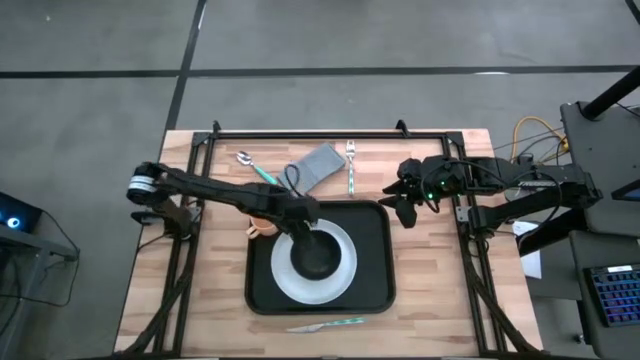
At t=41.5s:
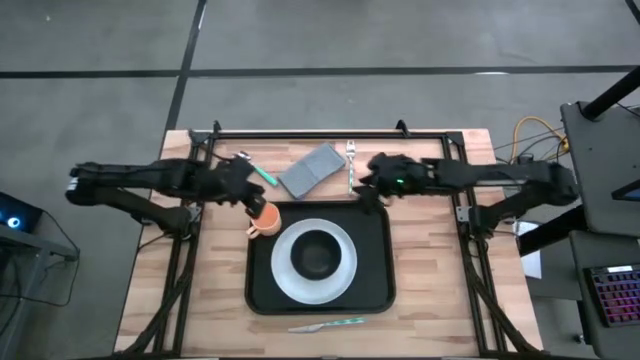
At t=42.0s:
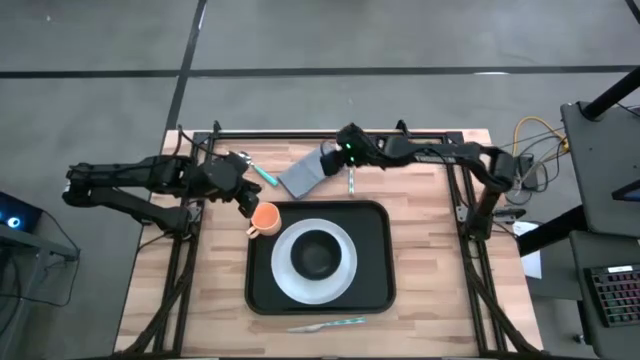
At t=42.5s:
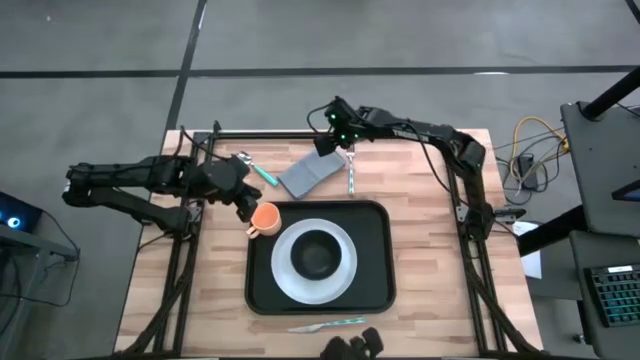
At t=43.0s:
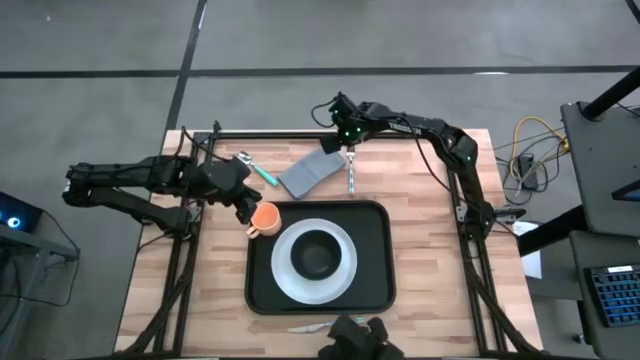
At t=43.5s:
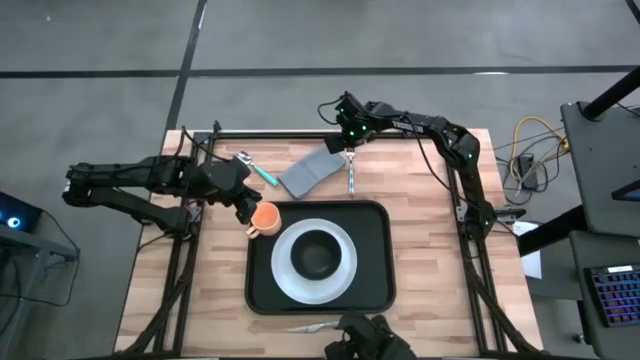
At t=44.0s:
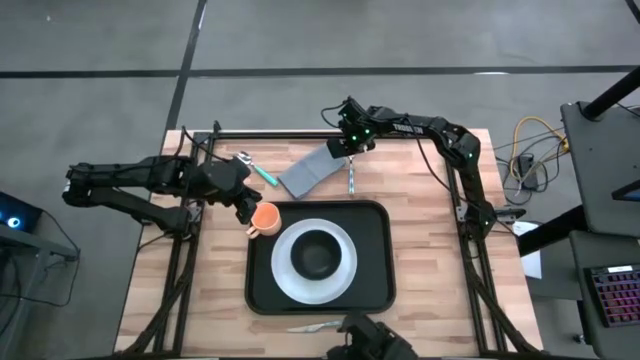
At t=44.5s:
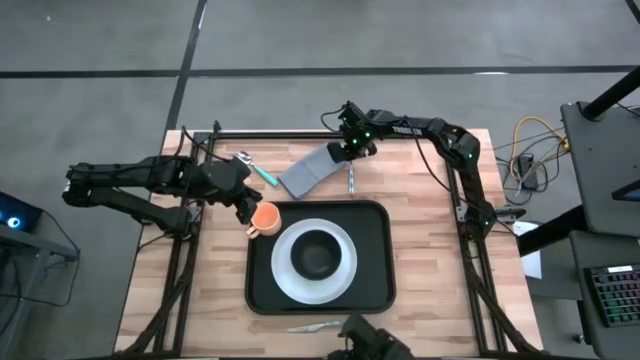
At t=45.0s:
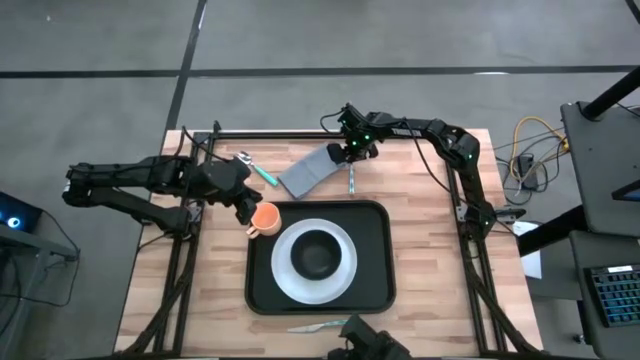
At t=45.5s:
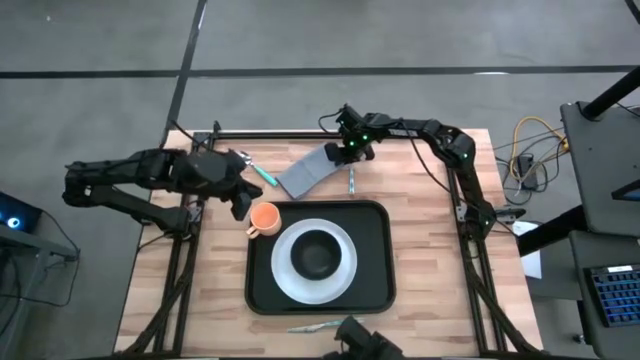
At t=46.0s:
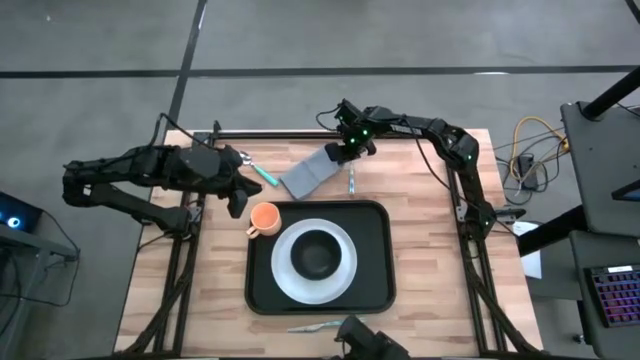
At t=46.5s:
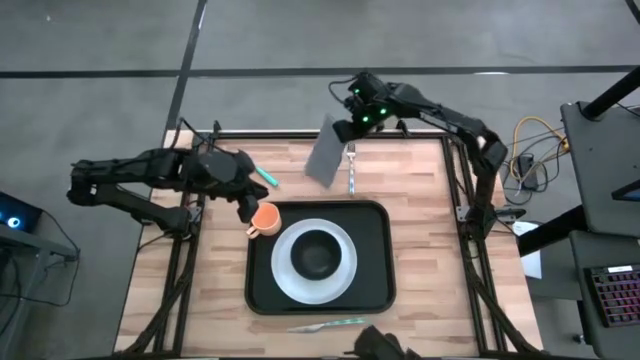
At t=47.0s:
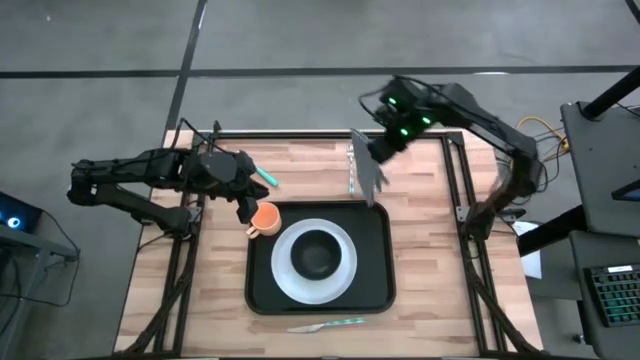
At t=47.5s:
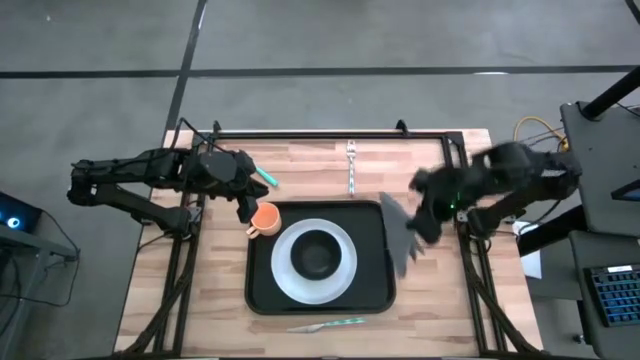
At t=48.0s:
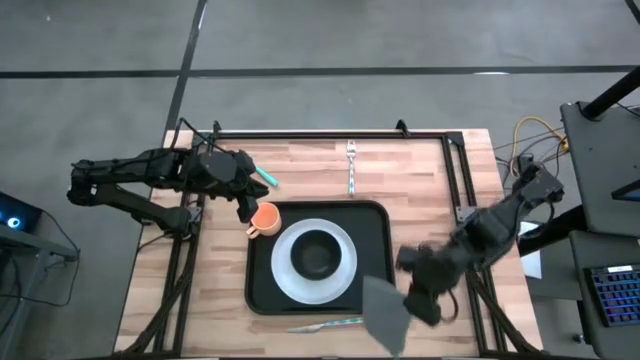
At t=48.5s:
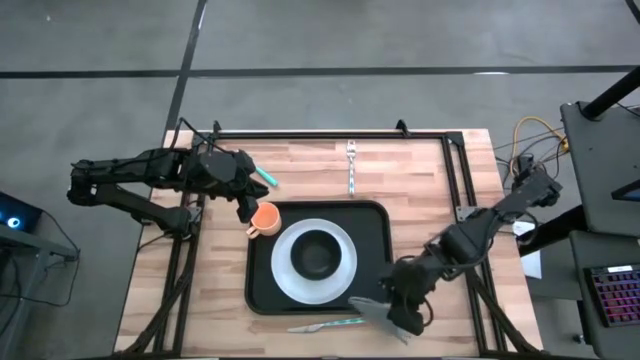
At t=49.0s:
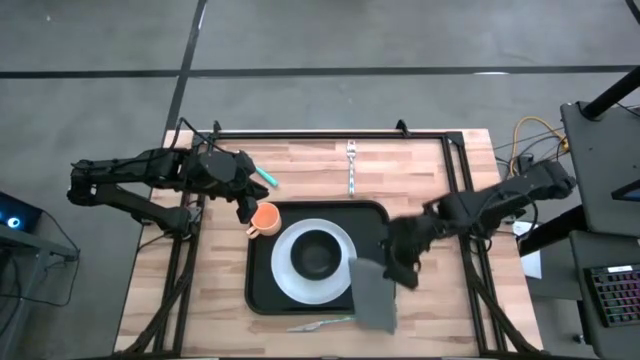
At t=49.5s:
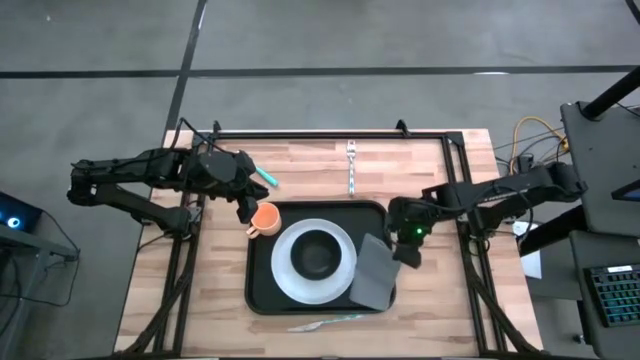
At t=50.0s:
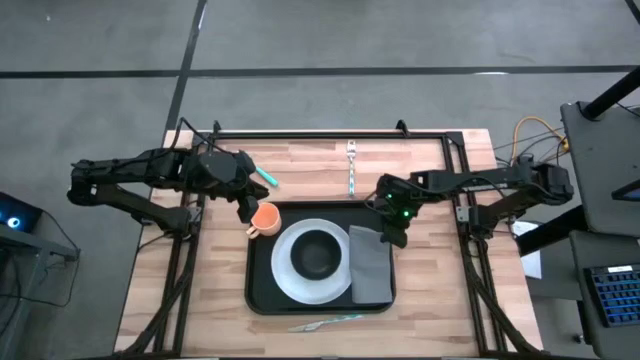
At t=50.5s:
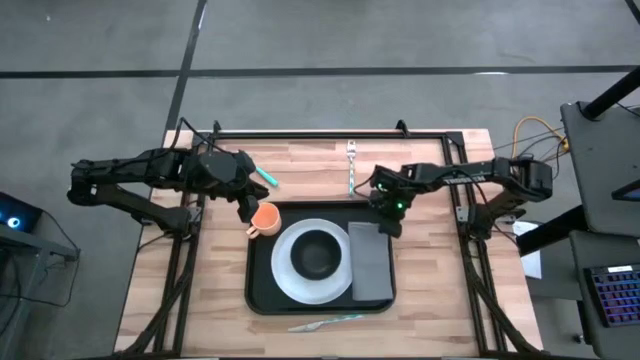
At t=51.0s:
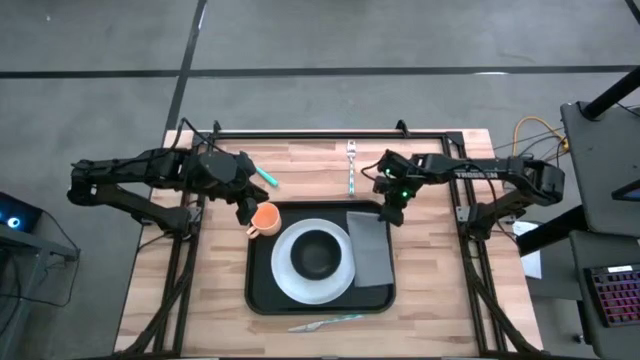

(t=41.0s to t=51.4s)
Task: Set up tray
Put the table napkin on the tray

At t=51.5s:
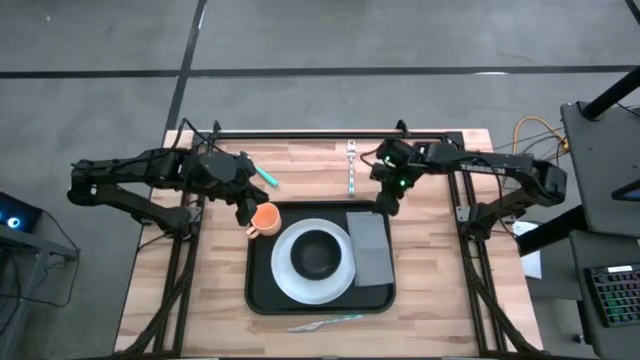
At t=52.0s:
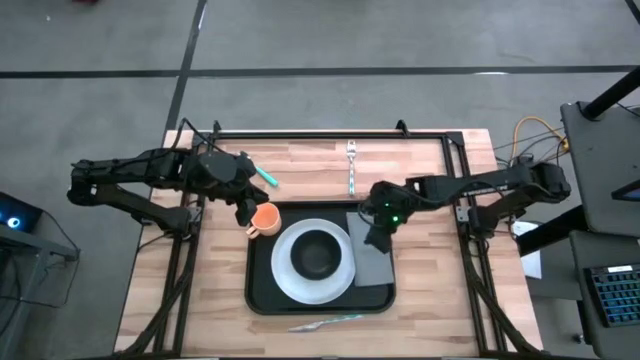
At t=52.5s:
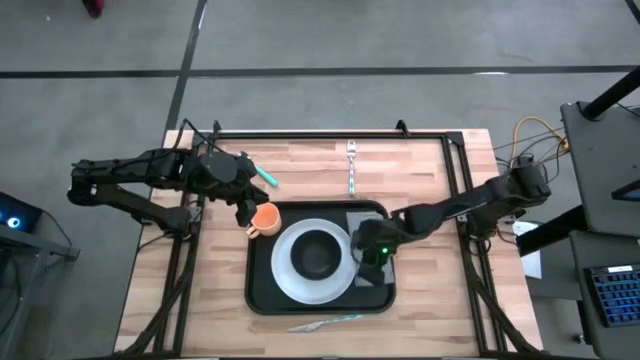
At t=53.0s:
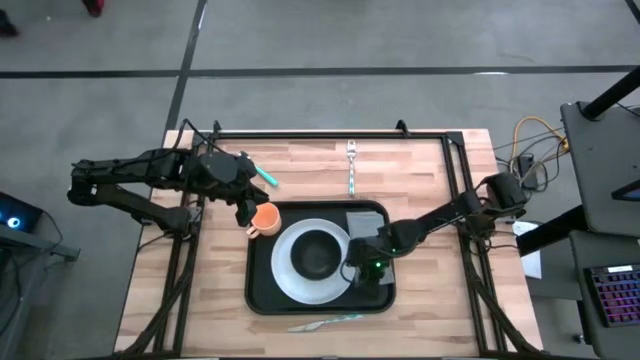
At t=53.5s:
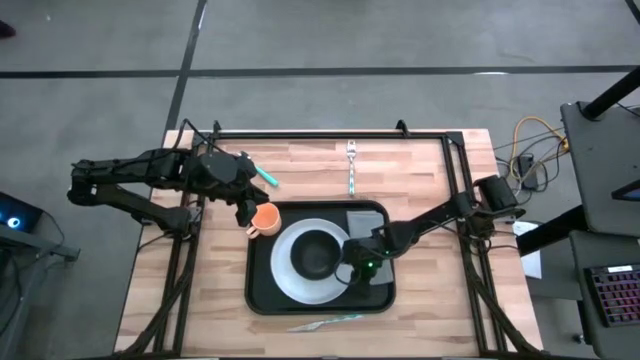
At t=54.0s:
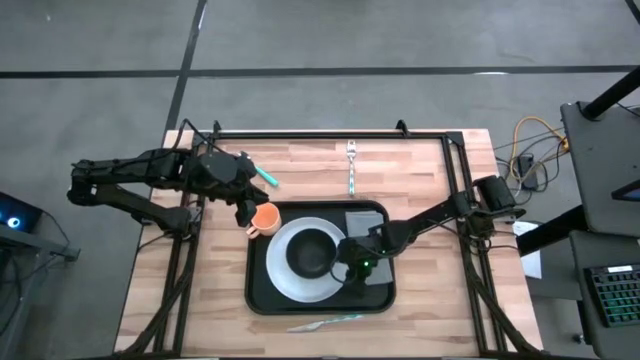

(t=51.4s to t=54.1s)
Adjust the white plate

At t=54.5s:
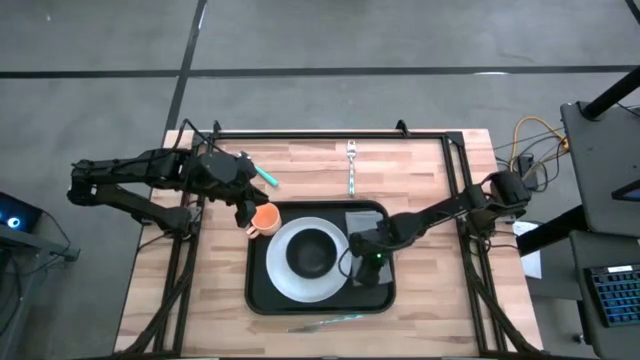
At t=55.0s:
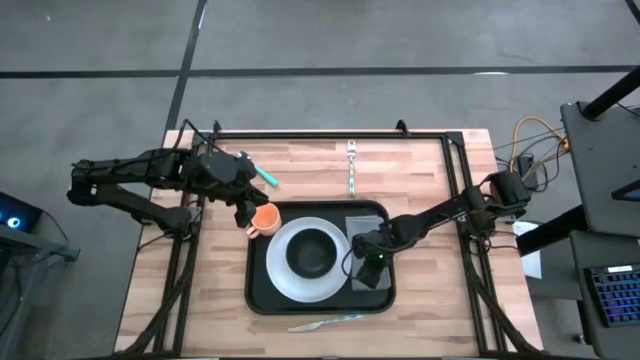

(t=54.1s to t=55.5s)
Adjust the right gray napkin

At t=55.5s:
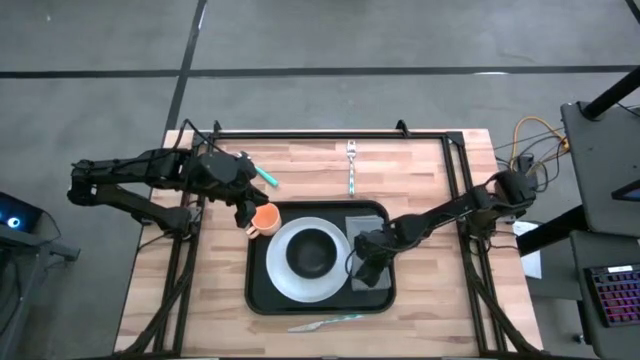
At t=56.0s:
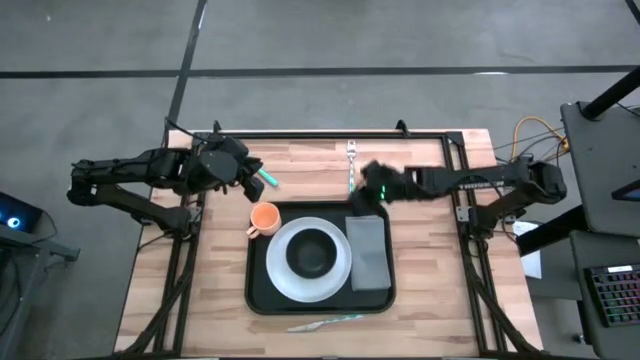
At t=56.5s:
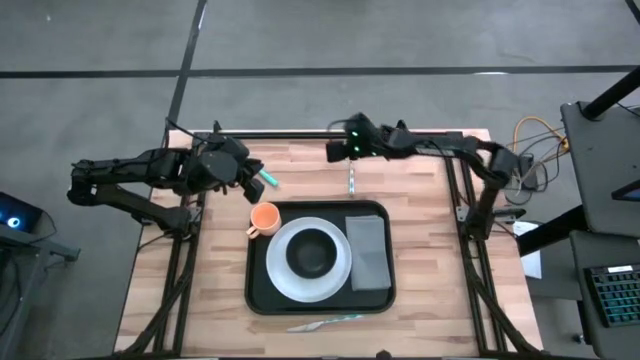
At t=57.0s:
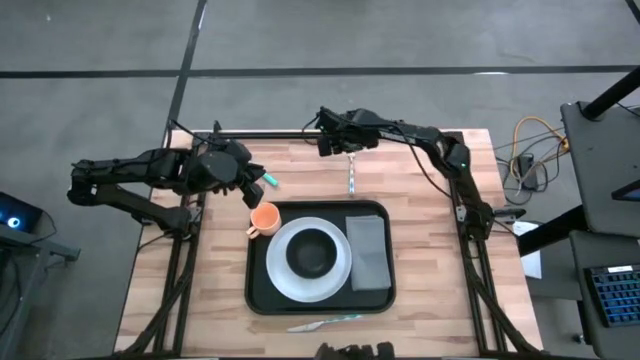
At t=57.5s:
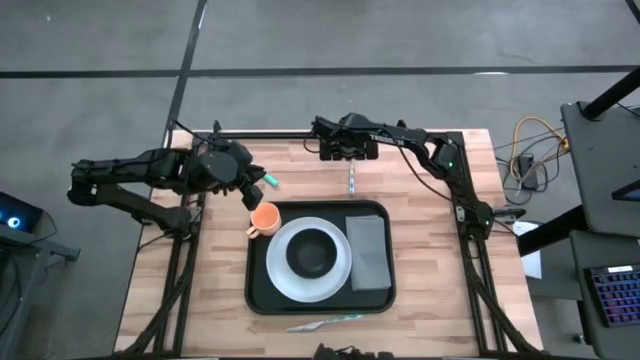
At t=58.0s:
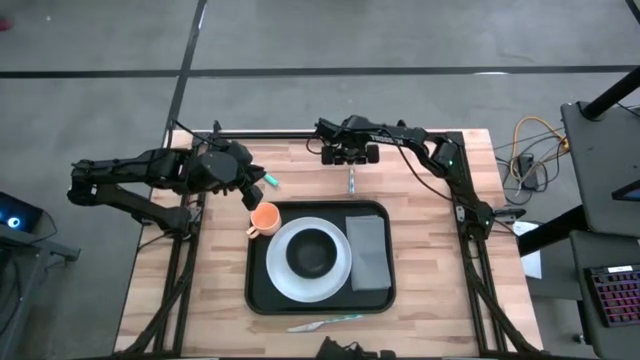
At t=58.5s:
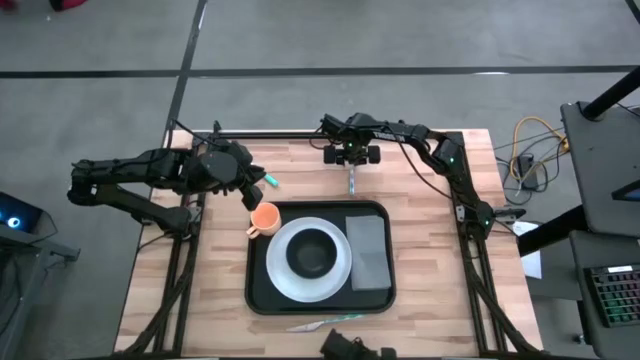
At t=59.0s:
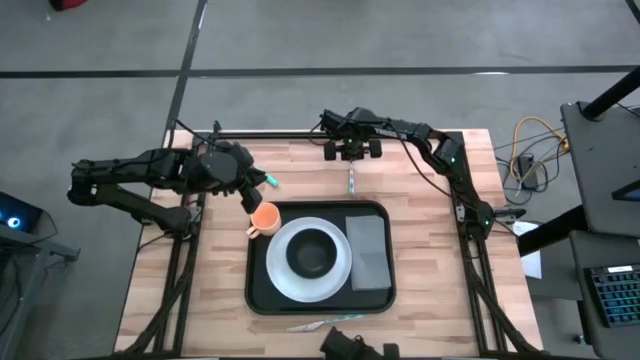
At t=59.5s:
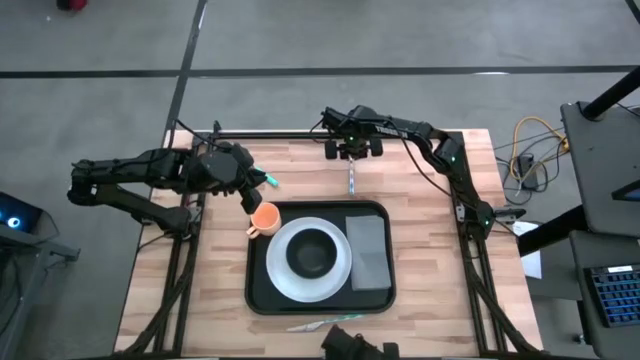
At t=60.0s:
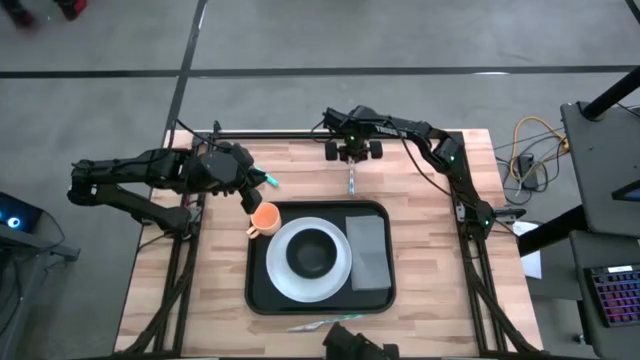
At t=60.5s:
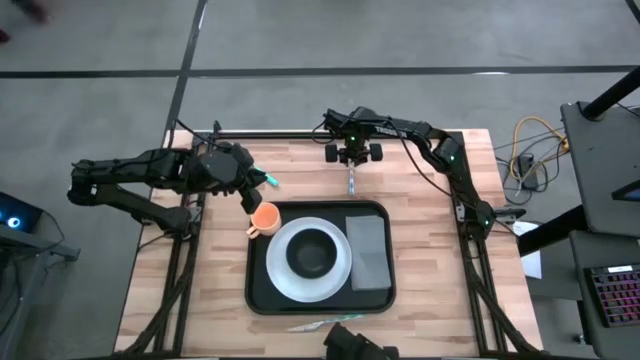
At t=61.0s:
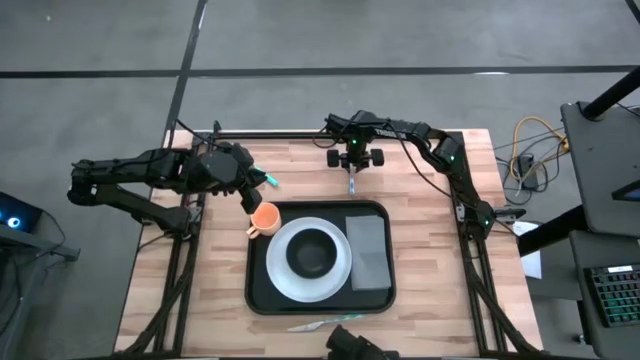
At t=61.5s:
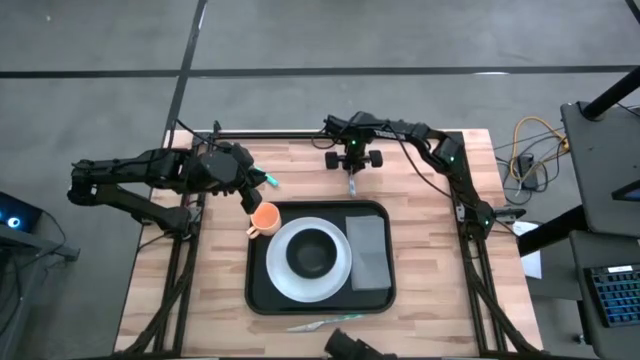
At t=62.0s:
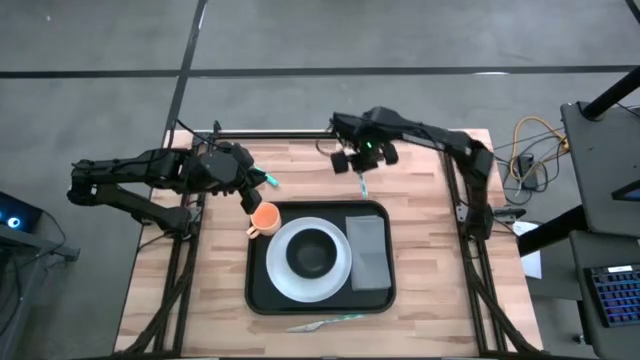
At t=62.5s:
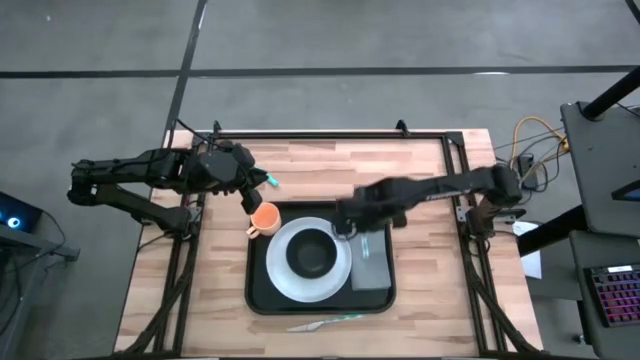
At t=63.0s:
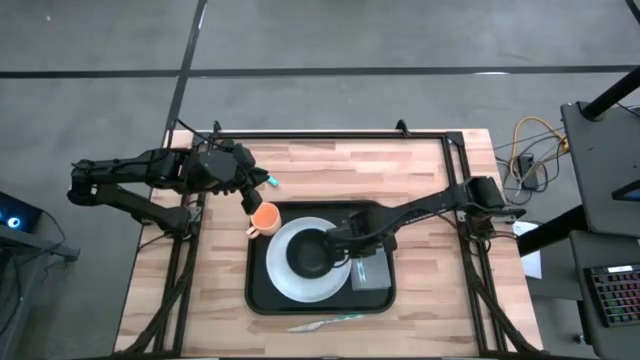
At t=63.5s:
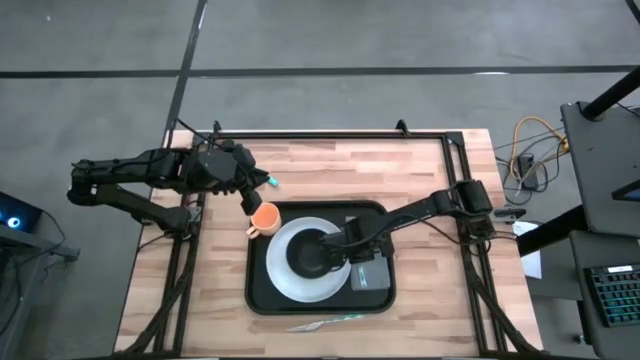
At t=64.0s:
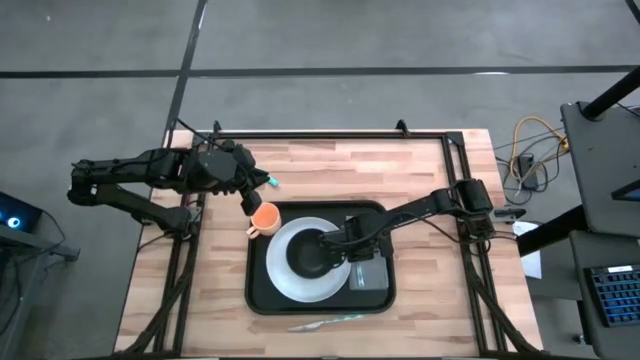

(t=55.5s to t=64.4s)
Put the fork on top of the napkin on the shelf
